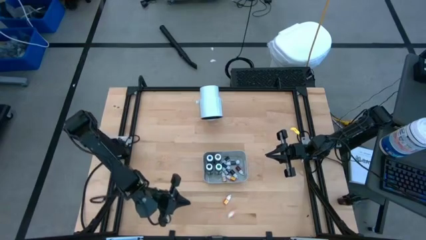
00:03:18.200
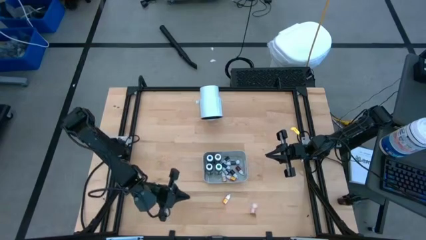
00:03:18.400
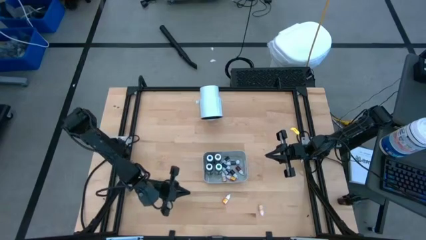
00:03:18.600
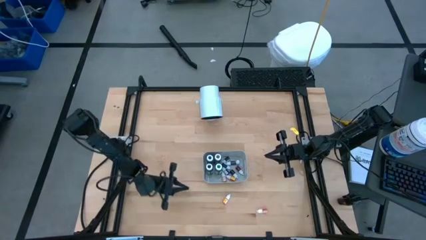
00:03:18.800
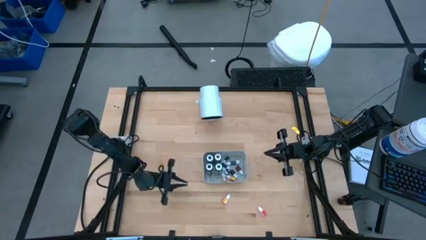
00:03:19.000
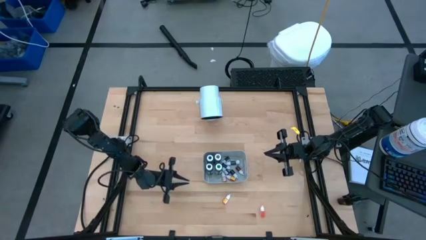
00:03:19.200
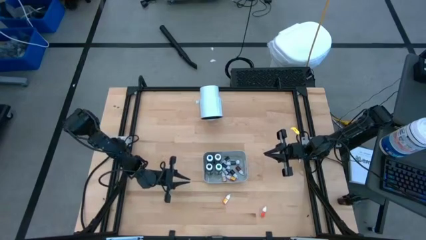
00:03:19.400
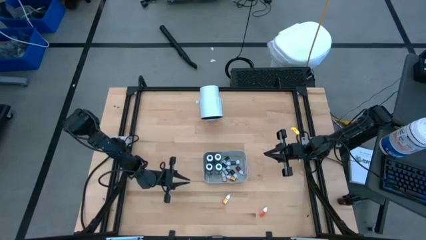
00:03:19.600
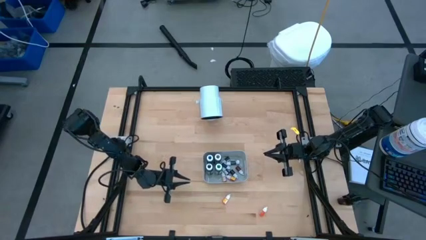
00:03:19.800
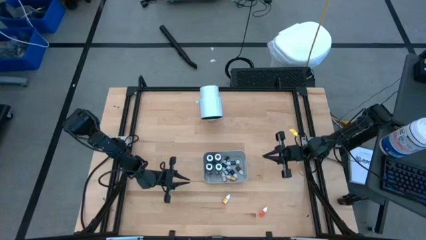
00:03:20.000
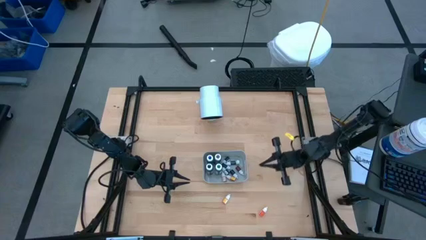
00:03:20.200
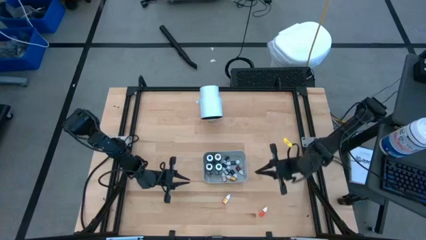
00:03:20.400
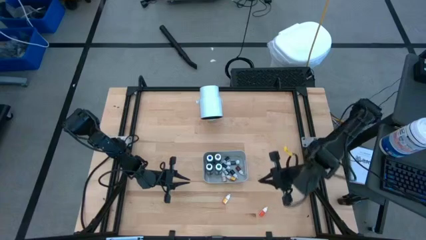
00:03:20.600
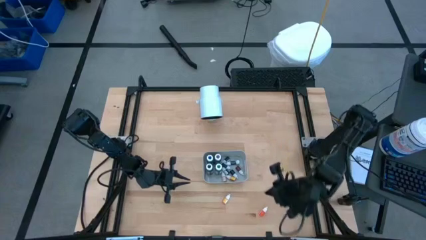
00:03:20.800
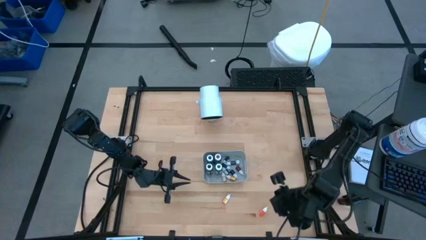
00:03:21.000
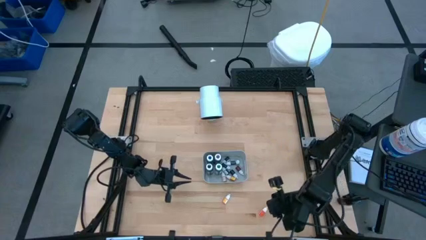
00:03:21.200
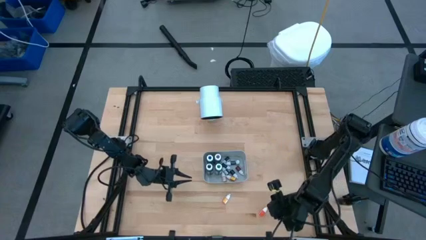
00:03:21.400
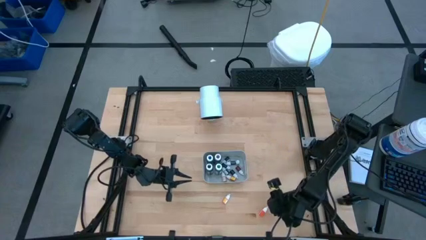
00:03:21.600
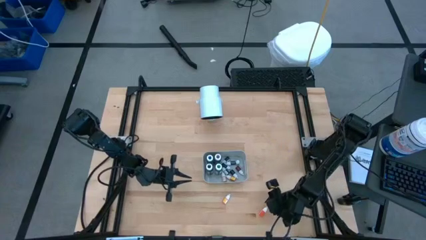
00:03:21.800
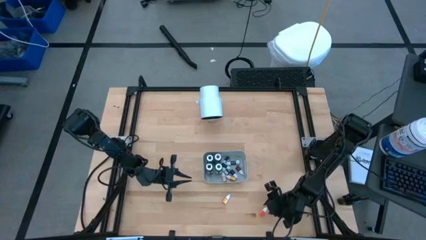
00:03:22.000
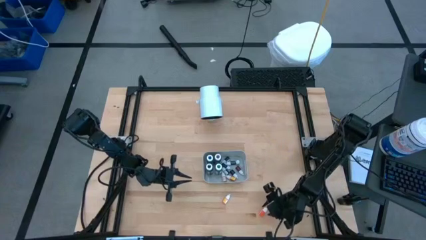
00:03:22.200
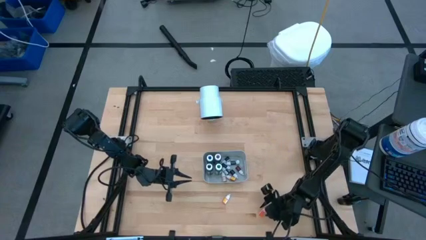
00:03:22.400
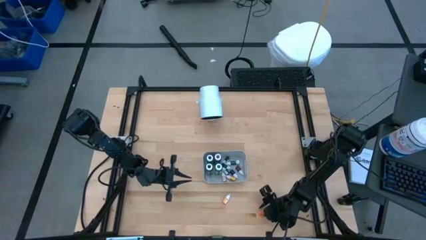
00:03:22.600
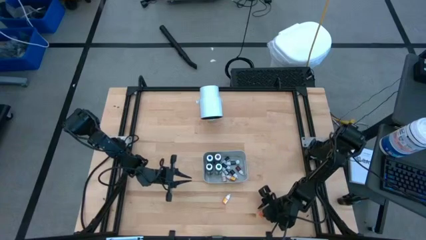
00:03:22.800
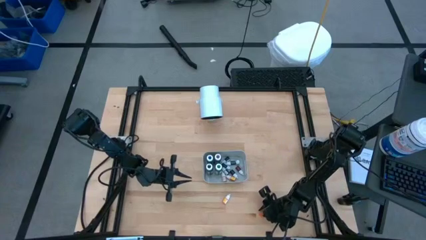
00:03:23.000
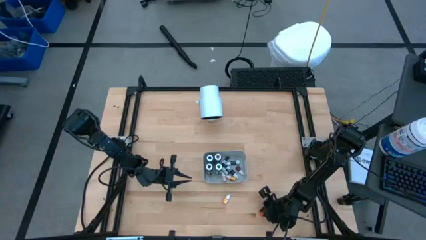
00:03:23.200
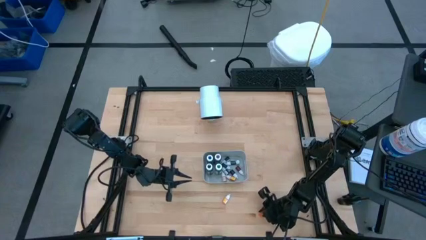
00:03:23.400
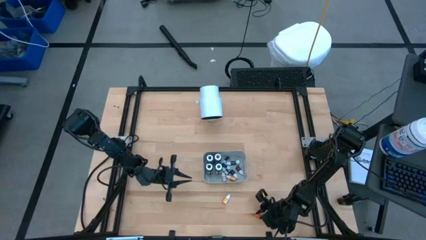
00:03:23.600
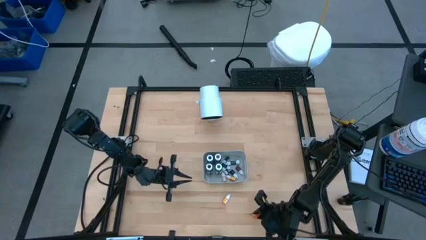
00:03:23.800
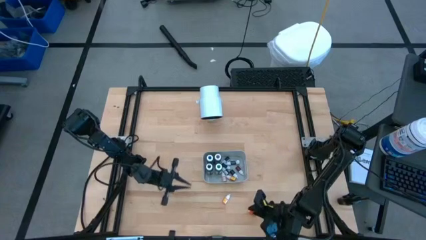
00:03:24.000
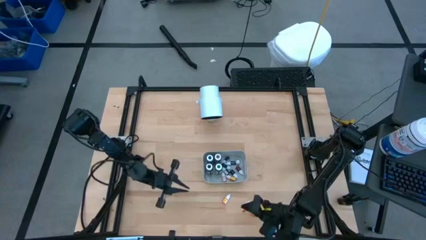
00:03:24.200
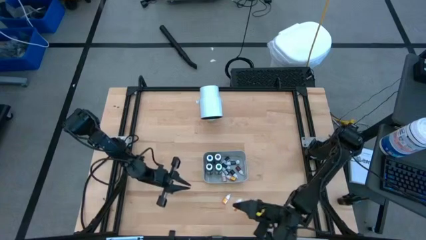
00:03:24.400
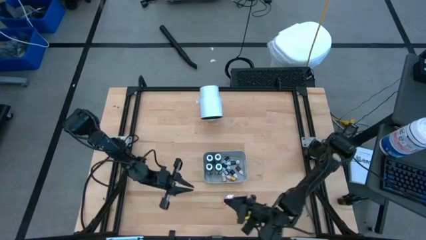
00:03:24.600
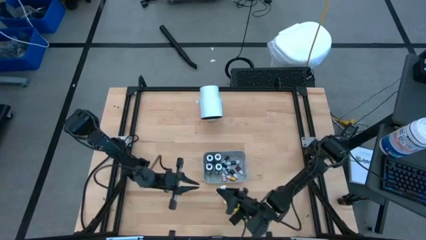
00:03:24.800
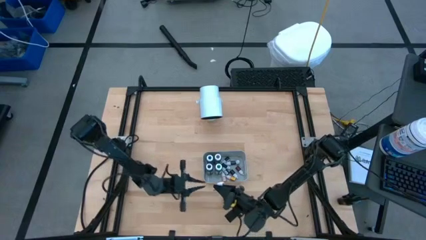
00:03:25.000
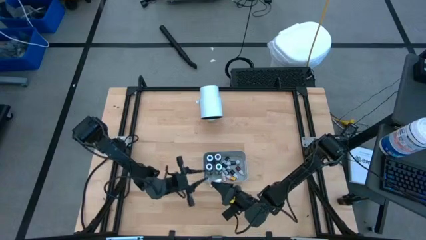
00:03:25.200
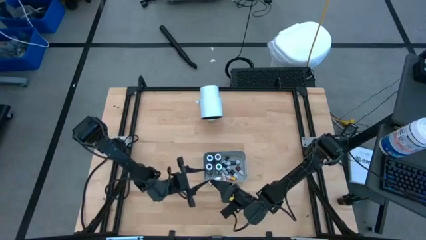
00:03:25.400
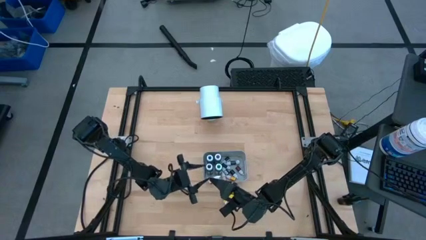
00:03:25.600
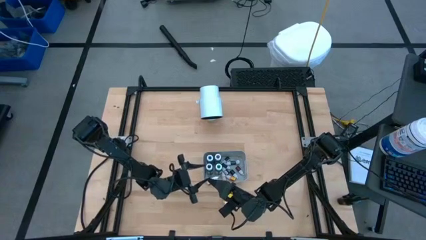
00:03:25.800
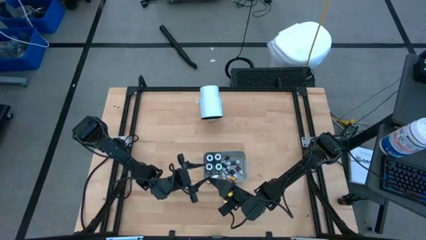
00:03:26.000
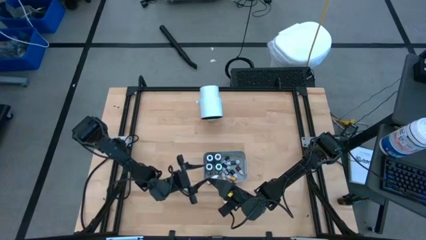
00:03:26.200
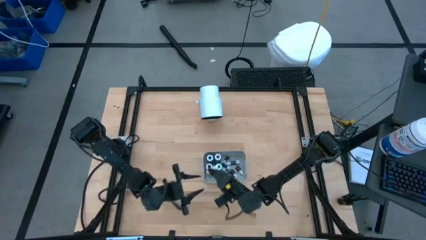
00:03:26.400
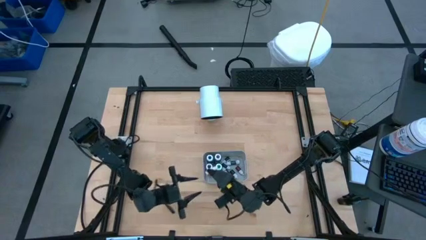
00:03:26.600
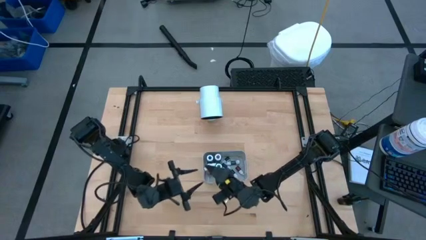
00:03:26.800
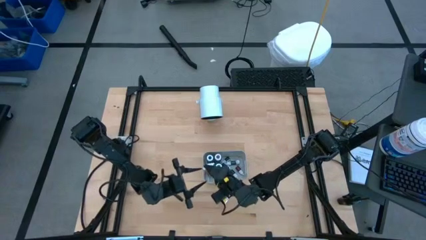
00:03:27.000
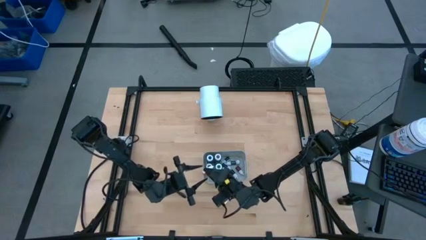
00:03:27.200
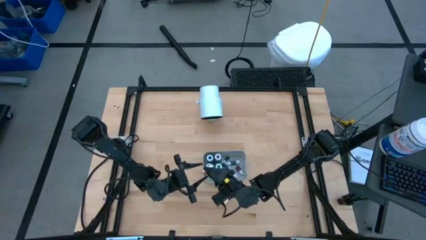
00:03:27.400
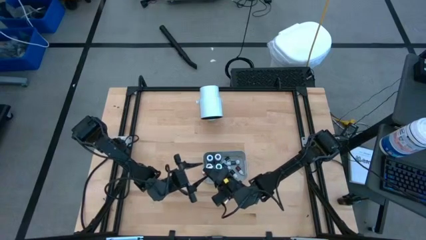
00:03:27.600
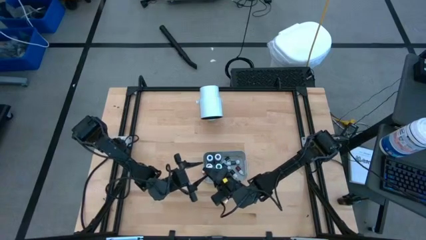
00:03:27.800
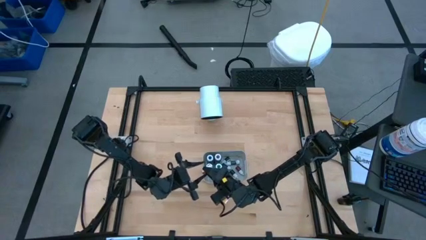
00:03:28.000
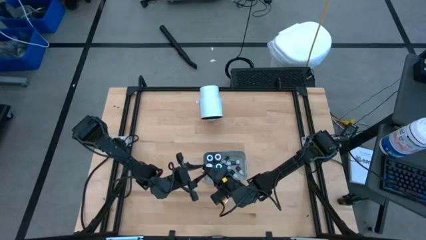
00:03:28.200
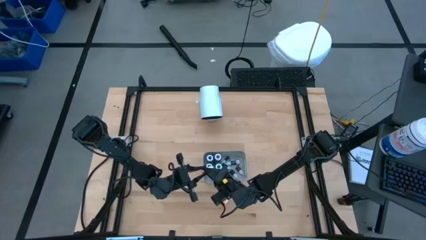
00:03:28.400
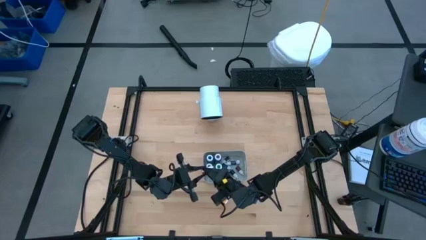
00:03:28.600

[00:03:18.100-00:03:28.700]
Task: Pick & Place food coloring
Put the orange food coloring bottle into the gray bin
